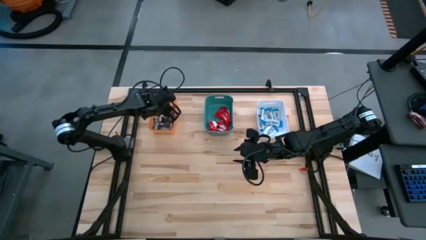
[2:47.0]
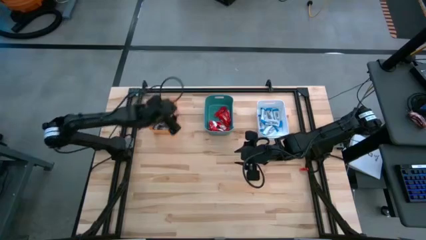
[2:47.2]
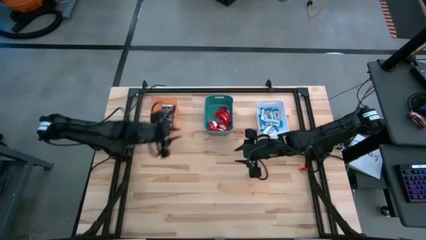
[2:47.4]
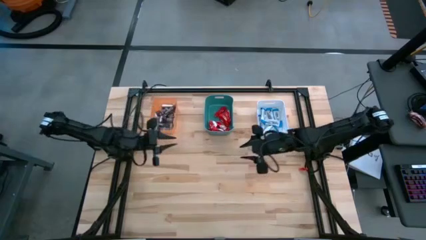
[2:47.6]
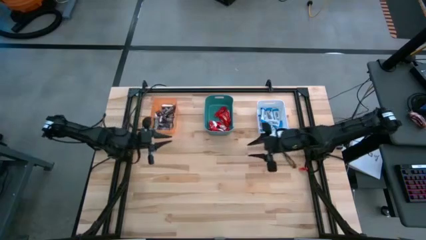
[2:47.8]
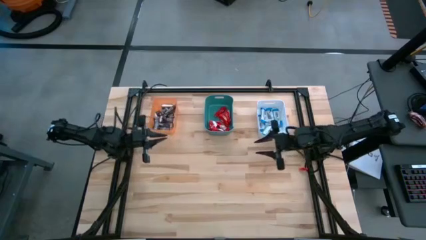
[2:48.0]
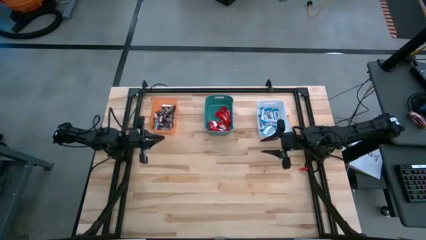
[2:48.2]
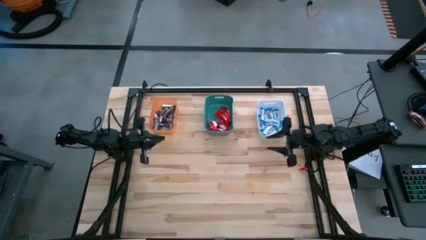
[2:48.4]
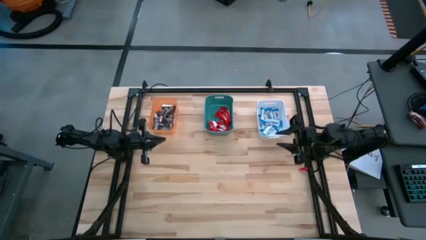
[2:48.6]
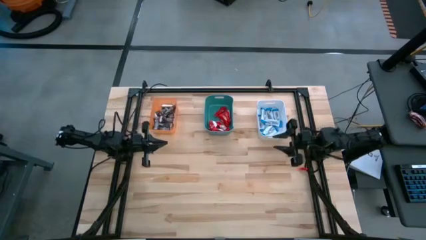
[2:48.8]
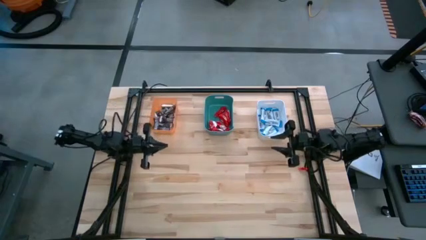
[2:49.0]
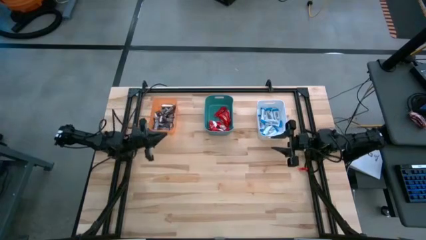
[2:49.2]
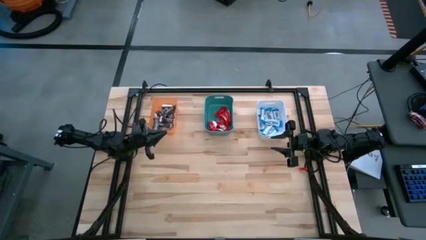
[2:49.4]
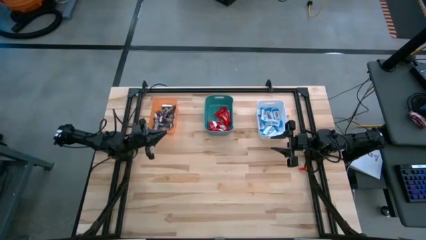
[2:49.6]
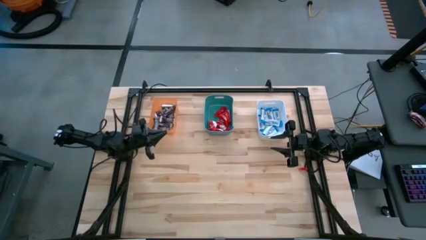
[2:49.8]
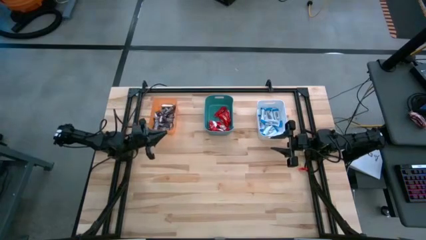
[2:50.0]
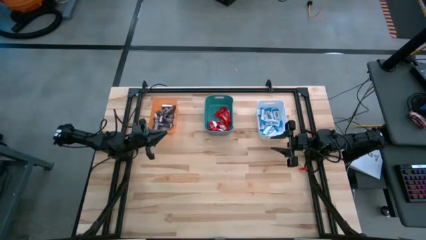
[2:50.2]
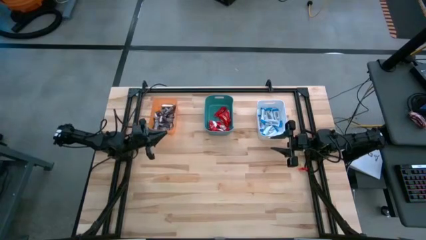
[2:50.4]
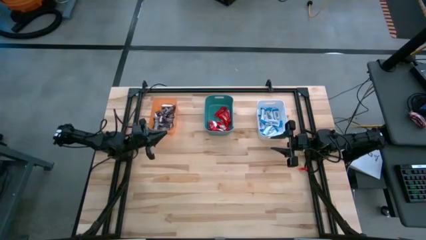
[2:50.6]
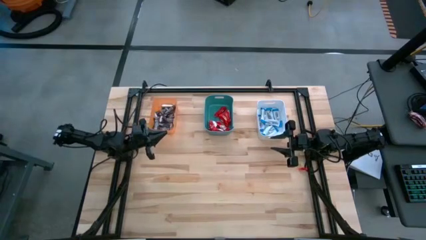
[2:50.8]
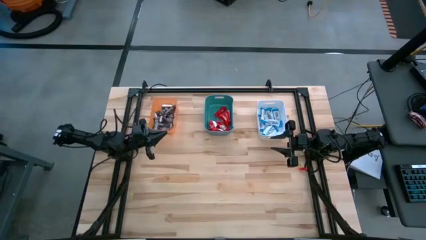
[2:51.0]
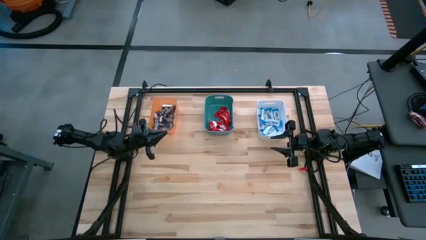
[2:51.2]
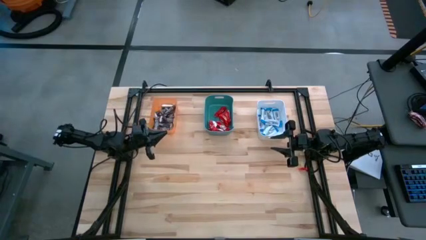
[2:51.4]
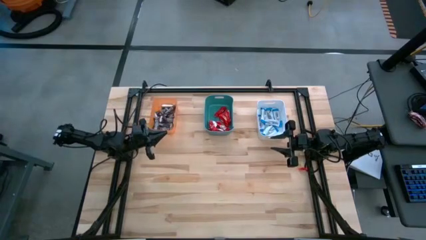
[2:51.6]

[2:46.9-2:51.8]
Task: Organize candy in baskets
Return to Home Position

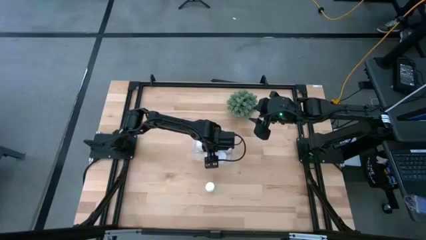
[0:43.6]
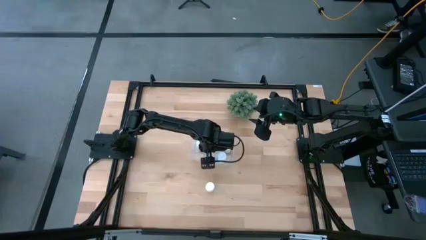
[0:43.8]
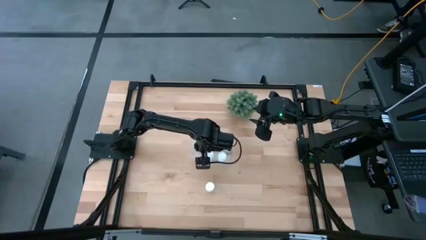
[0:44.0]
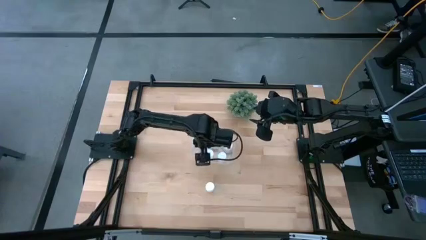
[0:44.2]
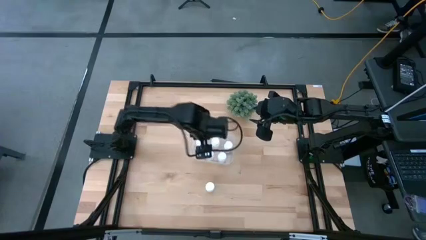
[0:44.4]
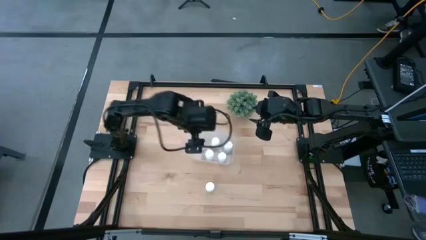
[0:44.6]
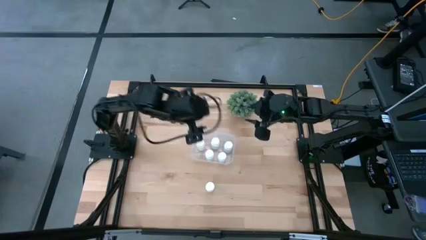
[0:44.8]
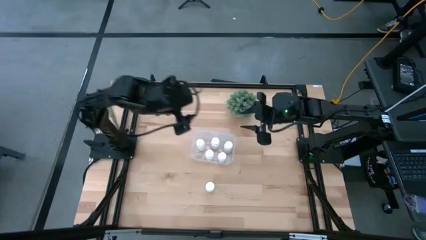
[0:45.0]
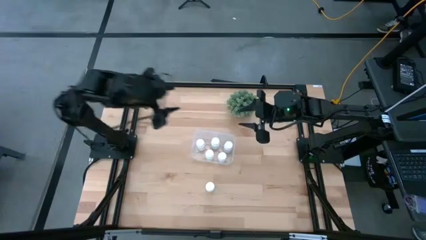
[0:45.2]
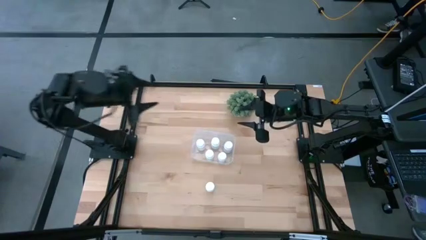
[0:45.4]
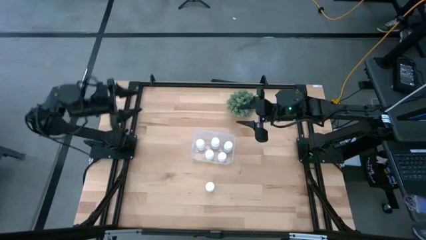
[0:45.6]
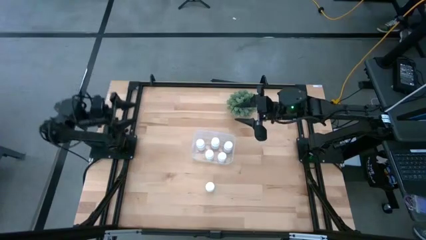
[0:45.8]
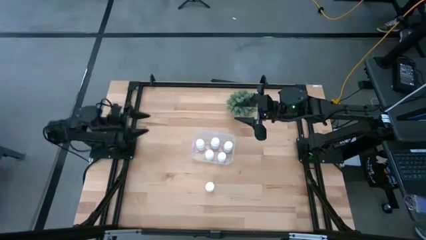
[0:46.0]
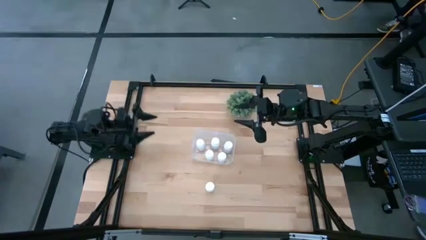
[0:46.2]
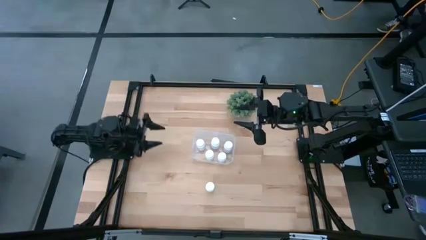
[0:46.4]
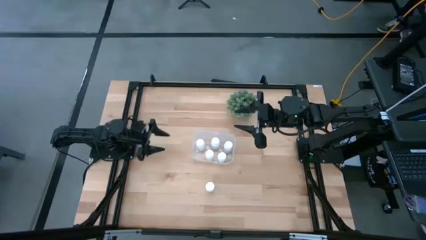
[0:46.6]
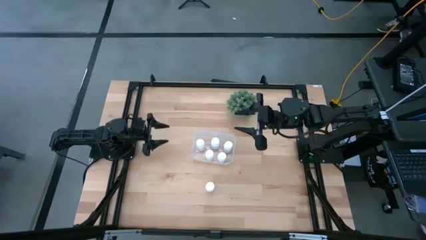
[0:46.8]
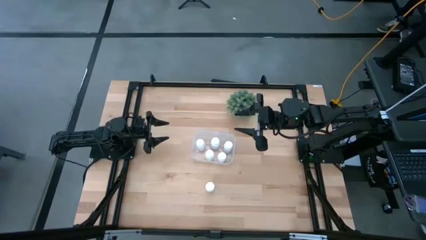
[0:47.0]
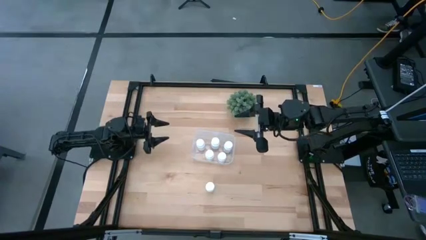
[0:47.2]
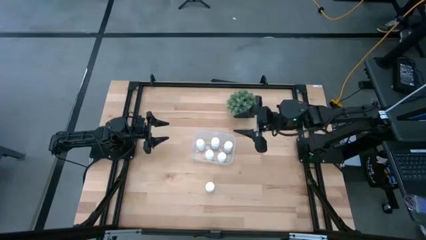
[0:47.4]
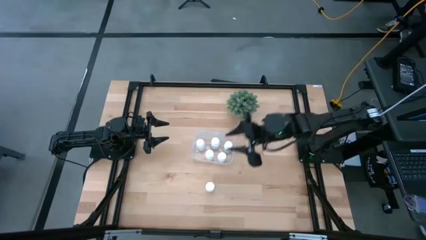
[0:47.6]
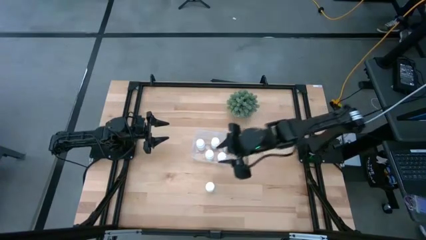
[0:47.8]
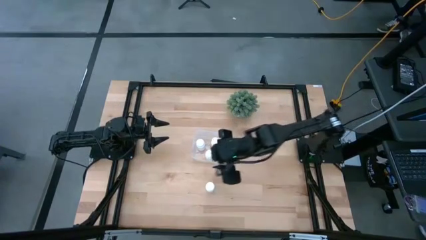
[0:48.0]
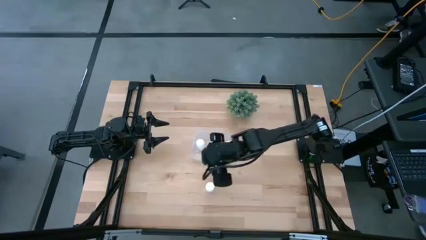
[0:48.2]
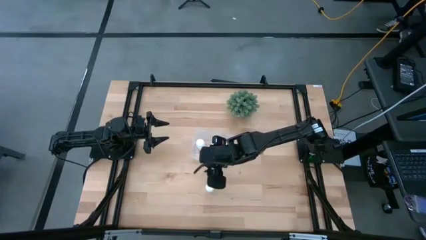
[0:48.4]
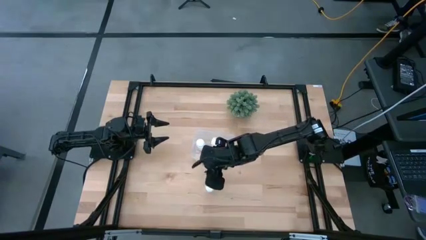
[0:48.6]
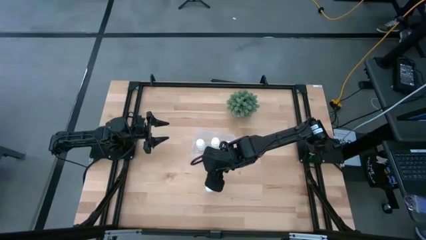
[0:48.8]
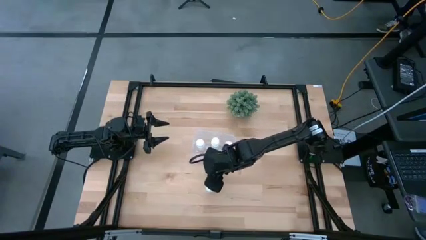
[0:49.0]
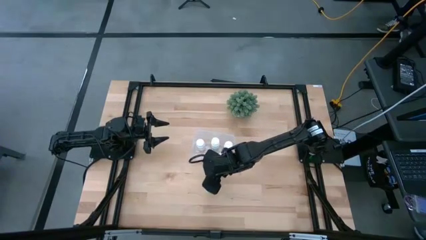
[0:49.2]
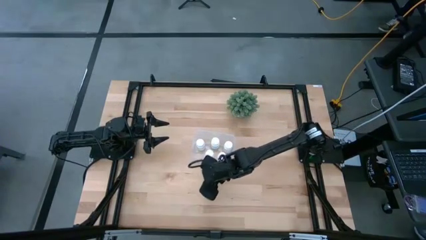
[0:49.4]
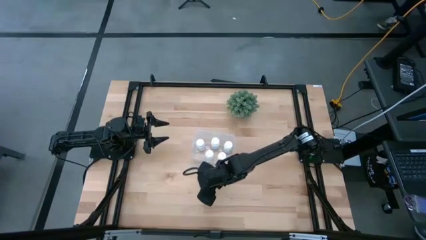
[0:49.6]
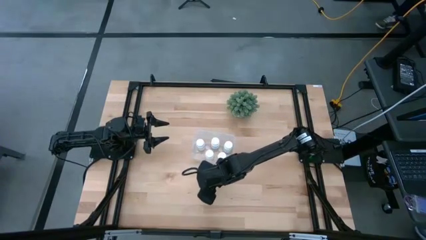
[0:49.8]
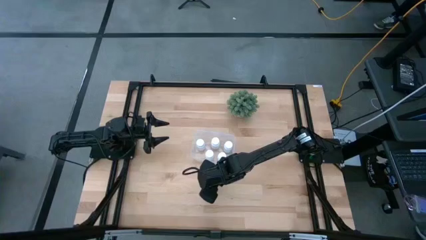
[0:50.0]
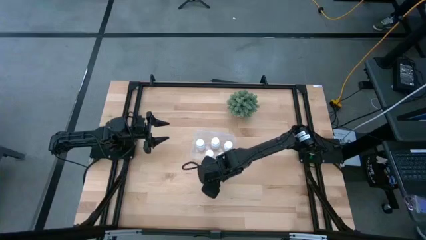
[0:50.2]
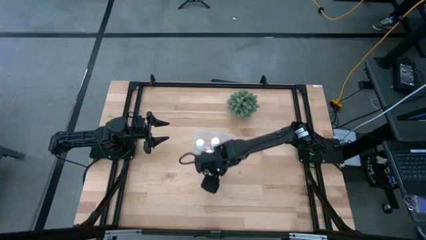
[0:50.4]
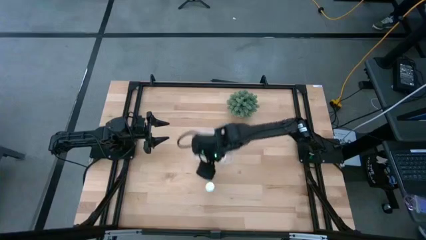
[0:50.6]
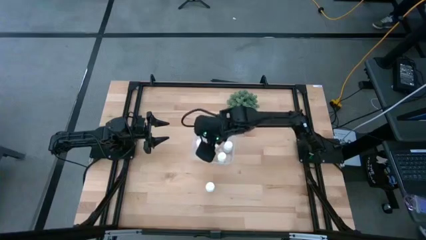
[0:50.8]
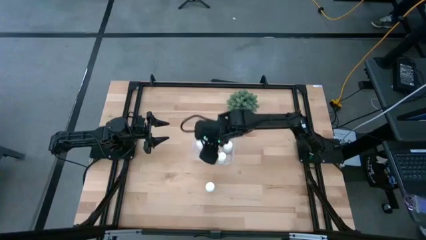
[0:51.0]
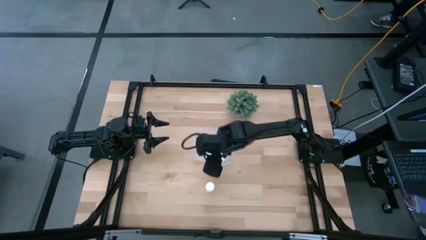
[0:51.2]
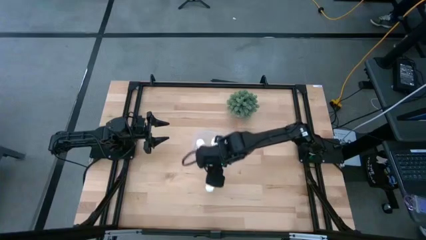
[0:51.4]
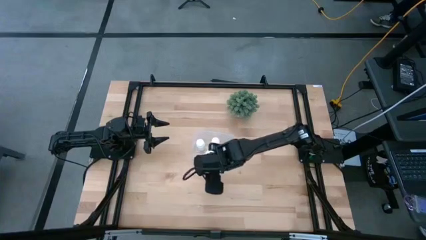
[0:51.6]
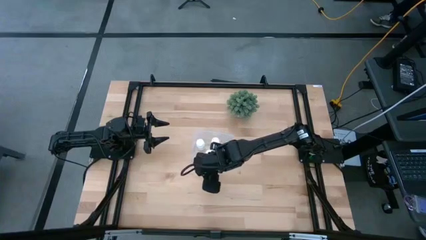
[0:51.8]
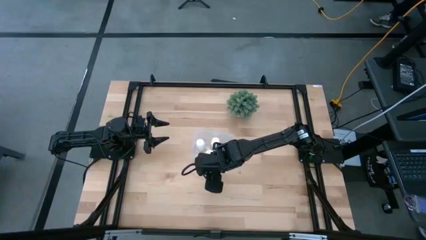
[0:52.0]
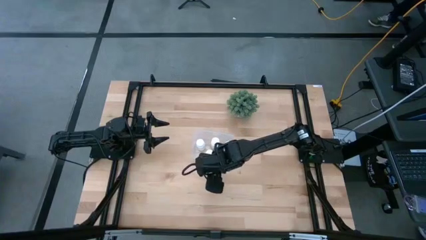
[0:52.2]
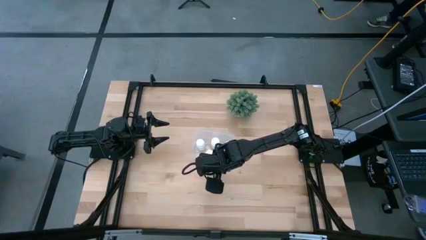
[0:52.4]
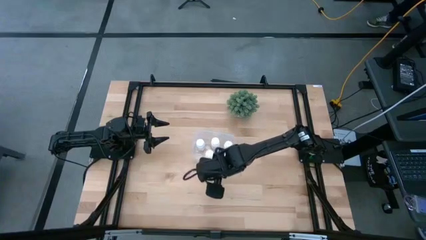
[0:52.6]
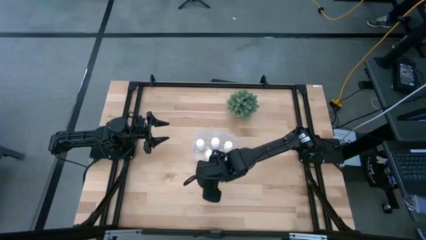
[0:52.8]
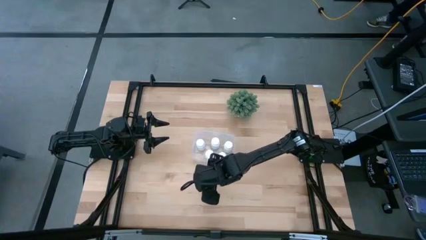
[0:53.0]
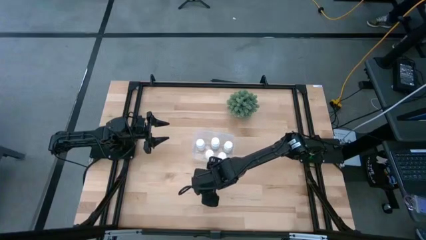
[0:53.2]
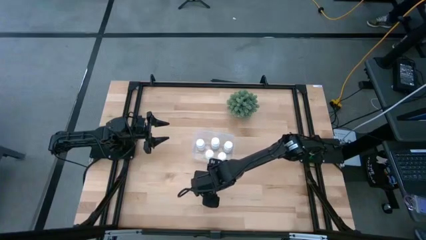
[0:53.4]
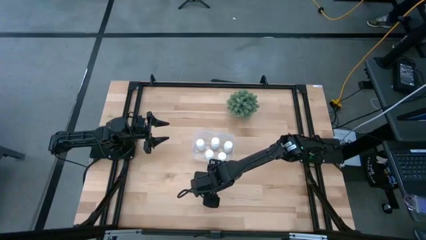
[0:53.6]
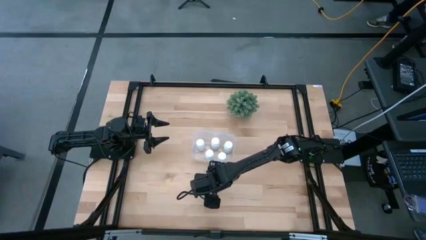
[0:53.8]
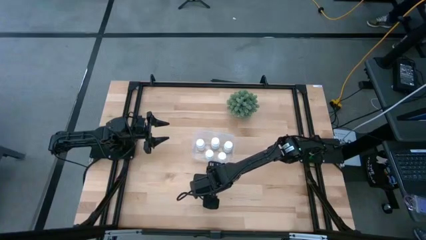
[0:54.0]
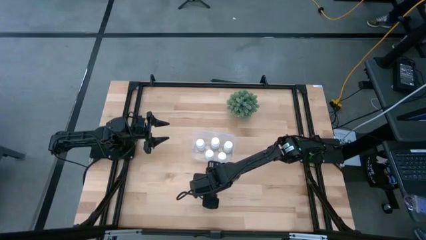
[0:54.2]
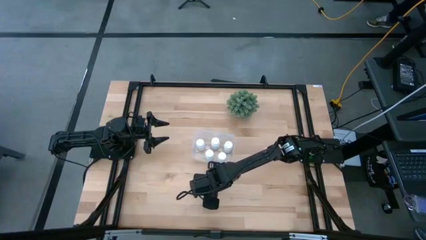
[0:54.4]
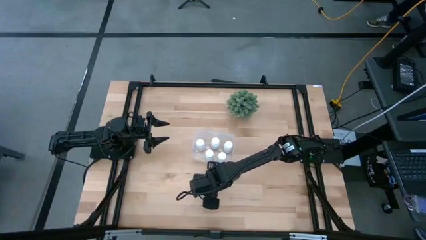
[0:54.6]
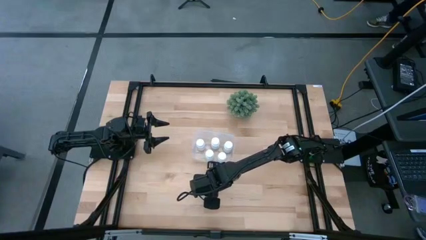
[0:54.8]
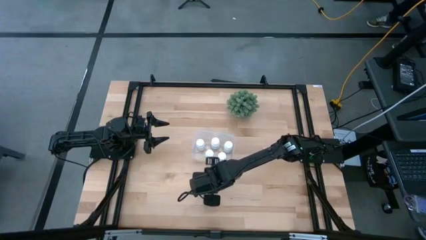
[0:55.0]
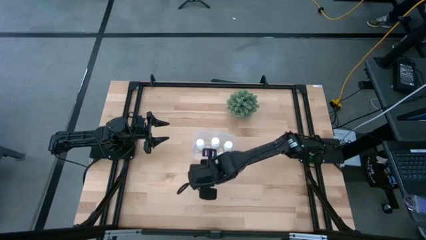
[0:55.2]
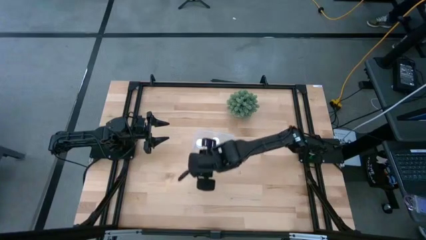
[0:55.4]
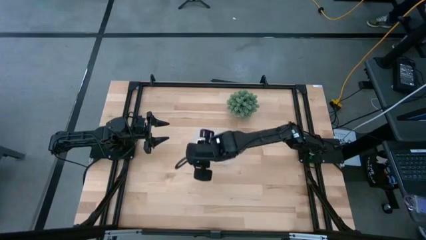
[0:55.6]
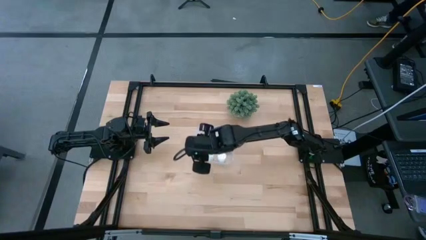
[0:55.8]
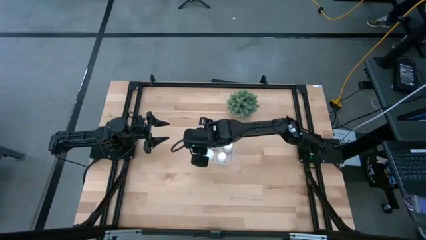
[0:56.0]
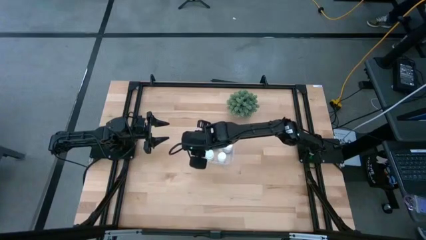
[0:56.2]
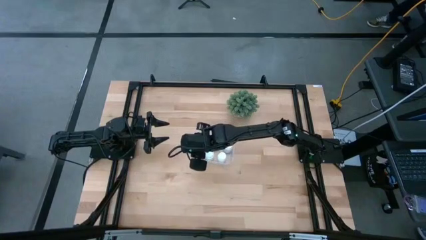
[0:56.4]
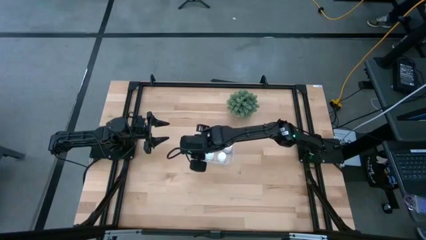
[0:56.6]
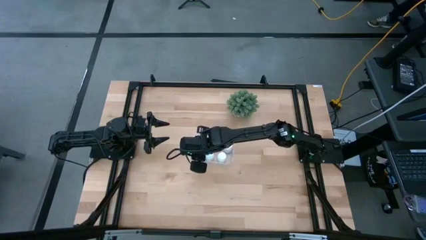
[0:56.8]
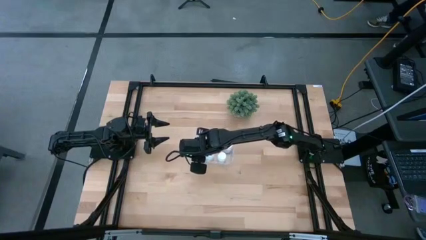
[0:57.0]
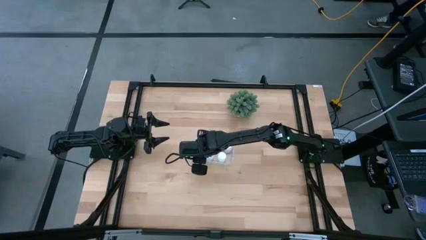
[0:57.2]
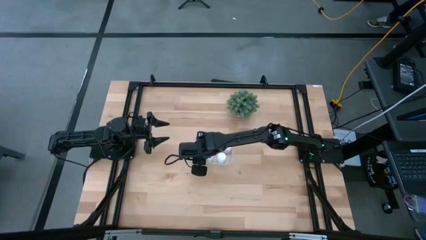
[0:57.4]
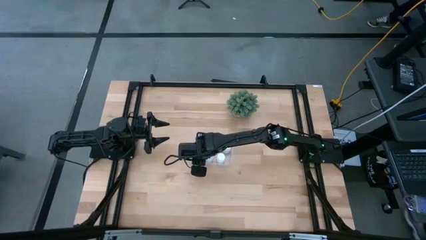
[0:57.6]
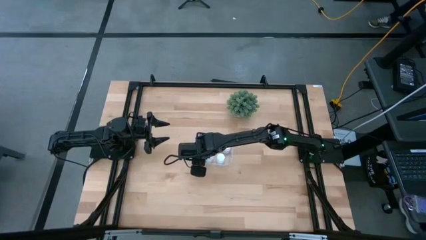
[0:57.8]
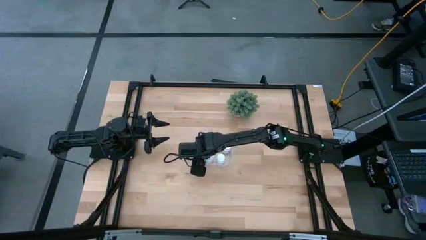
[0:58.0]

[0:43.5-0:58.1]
Task: Pick and place pill bottles into a basket
Put the white pill bottle into the transparent bin
